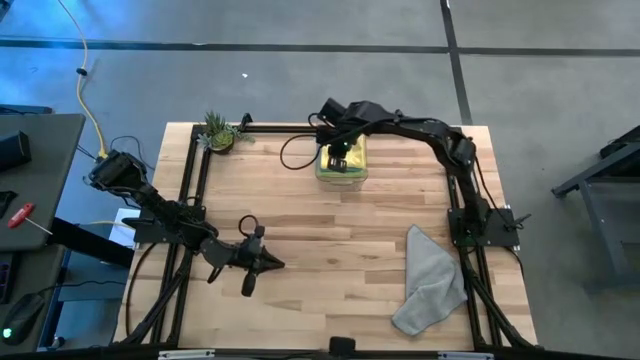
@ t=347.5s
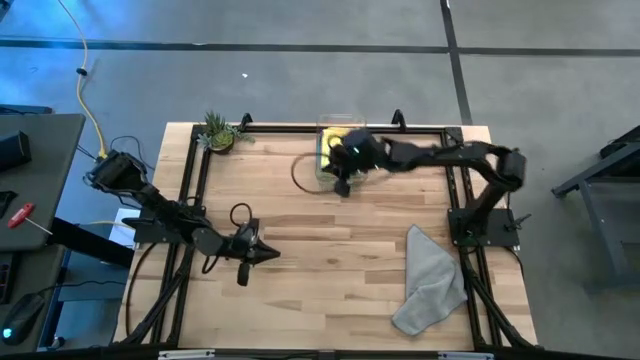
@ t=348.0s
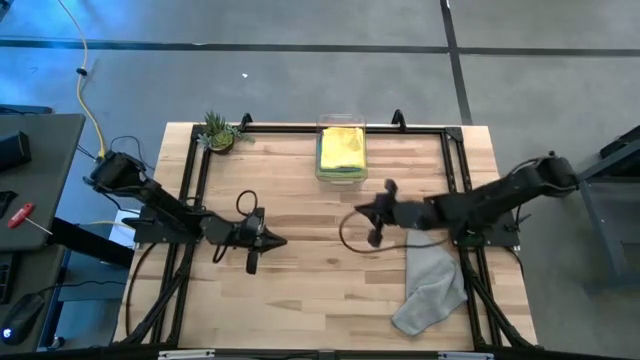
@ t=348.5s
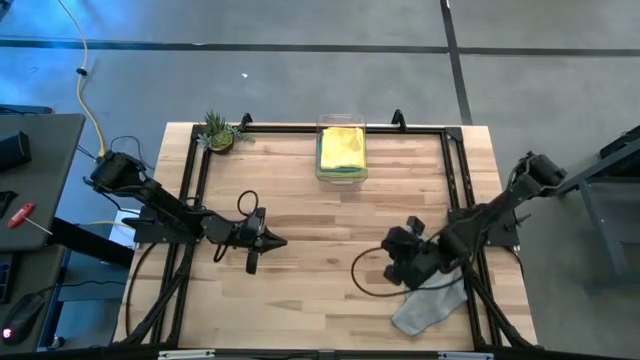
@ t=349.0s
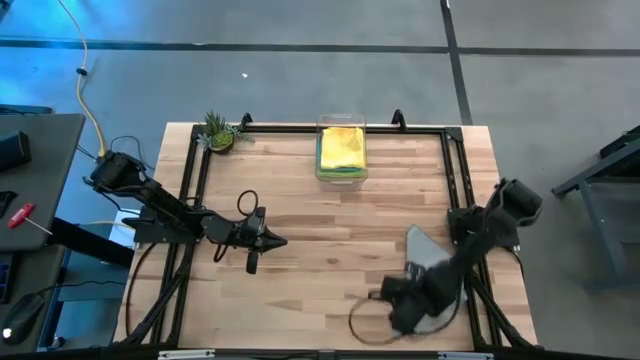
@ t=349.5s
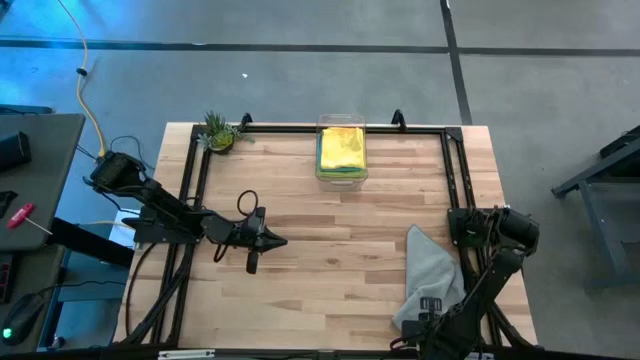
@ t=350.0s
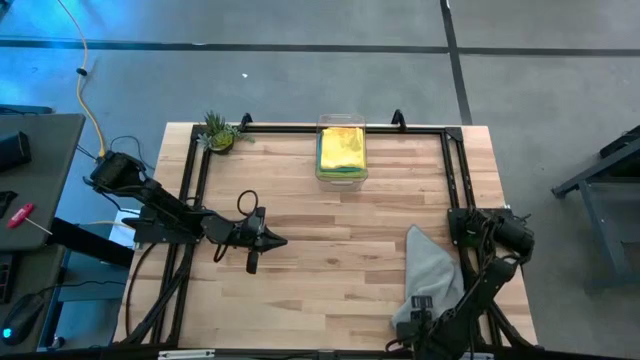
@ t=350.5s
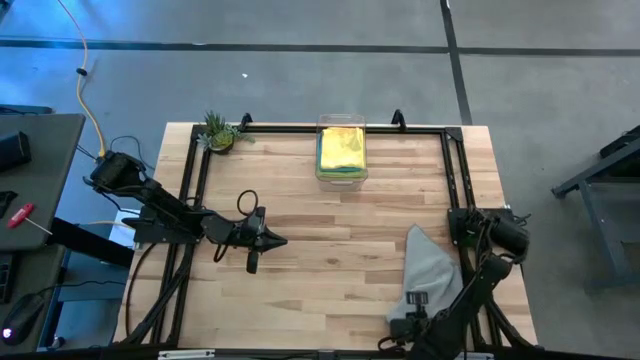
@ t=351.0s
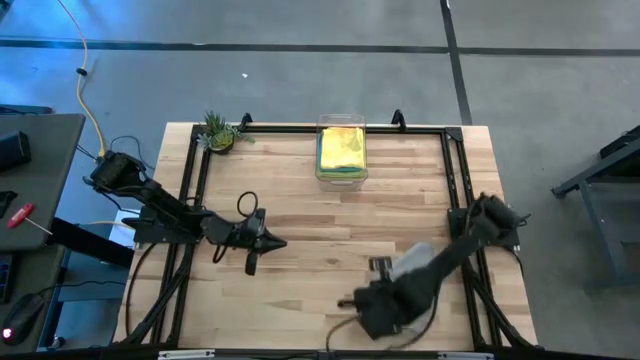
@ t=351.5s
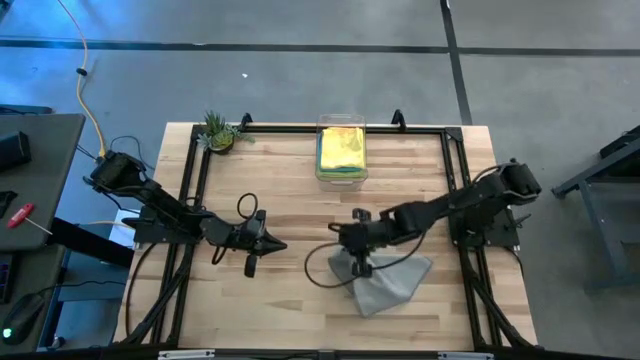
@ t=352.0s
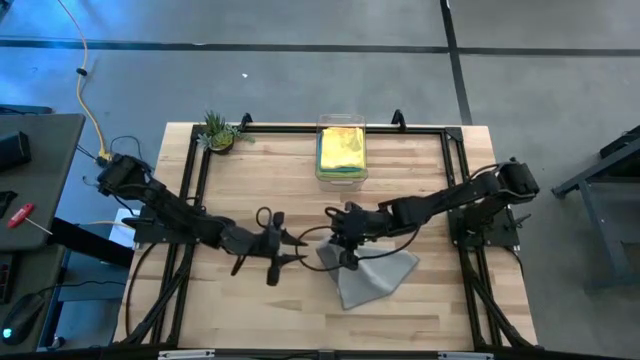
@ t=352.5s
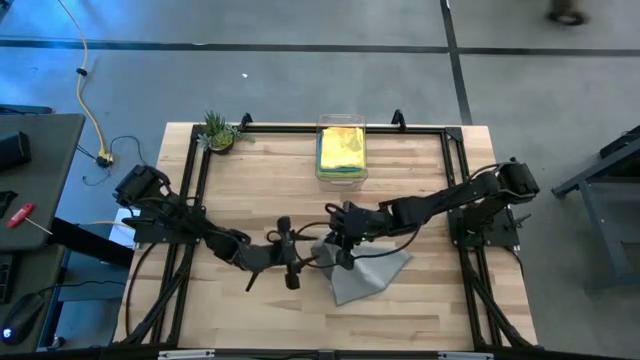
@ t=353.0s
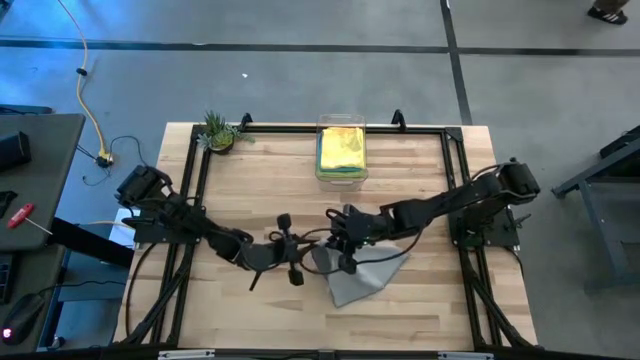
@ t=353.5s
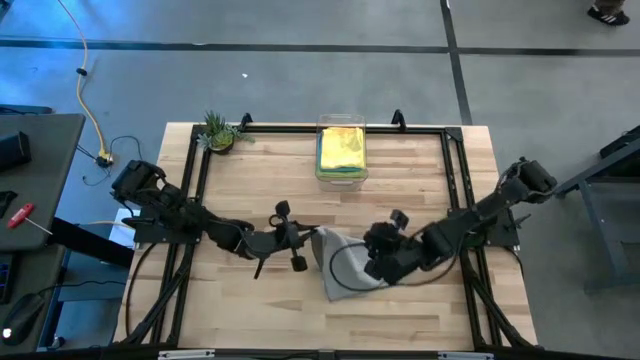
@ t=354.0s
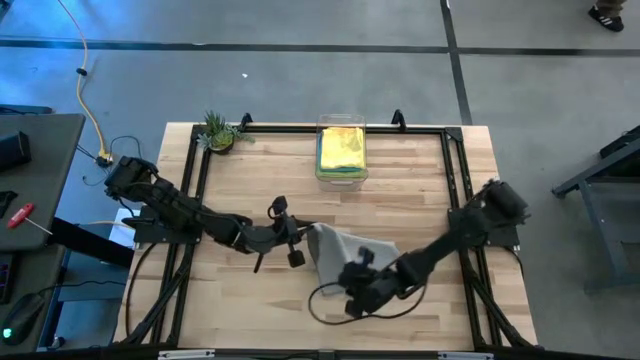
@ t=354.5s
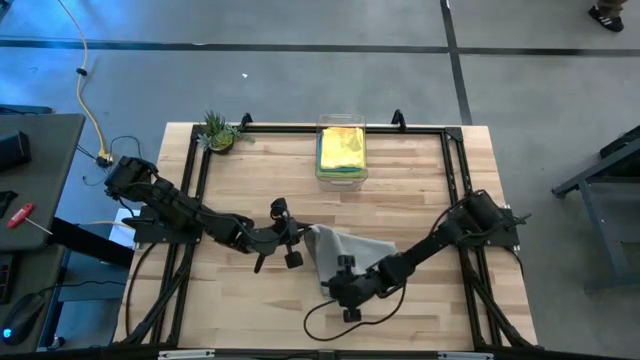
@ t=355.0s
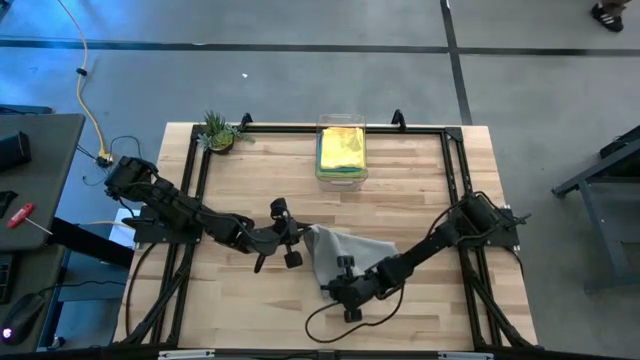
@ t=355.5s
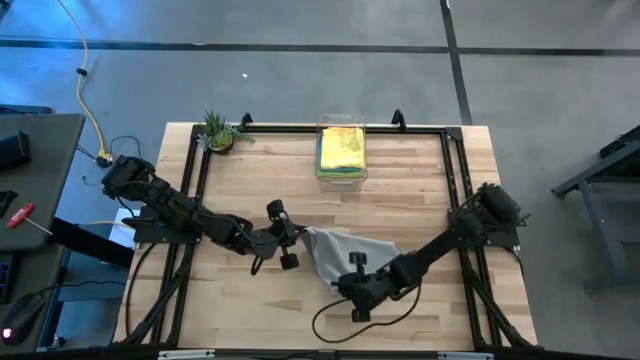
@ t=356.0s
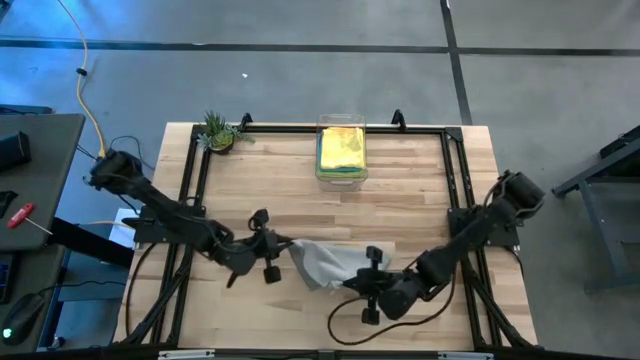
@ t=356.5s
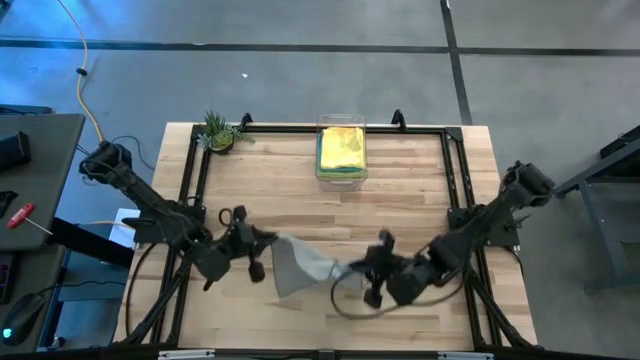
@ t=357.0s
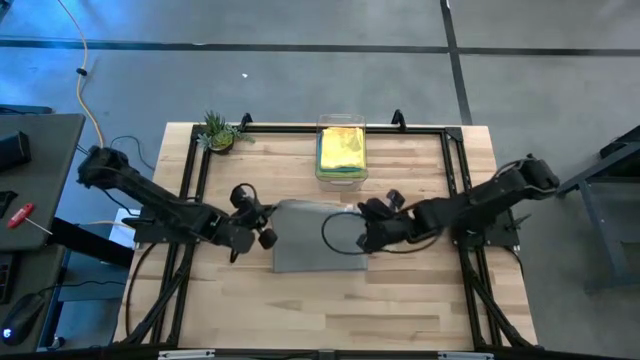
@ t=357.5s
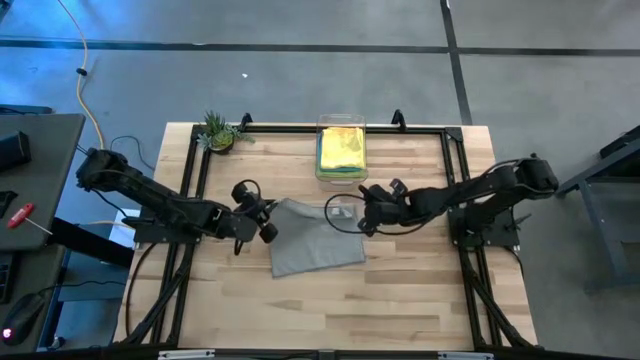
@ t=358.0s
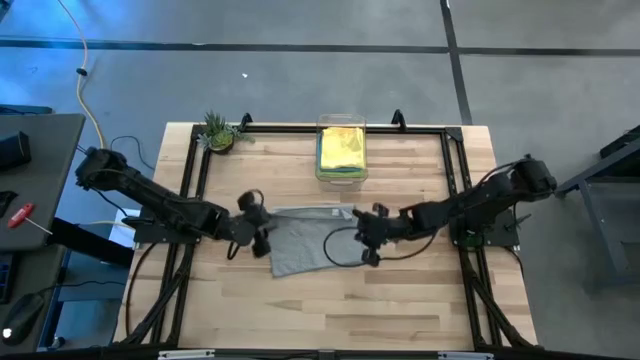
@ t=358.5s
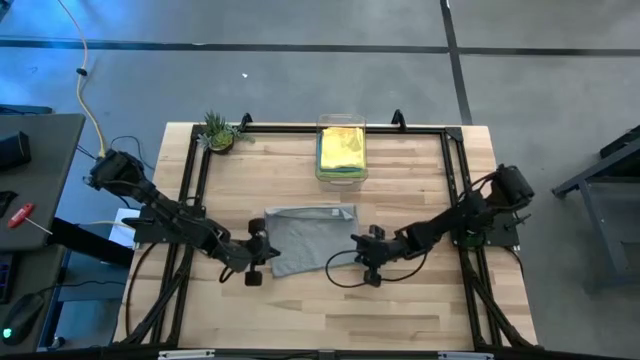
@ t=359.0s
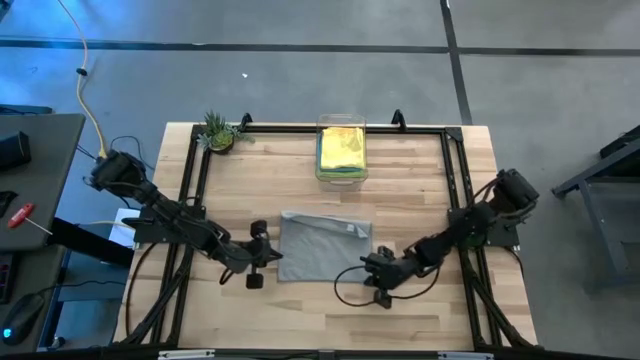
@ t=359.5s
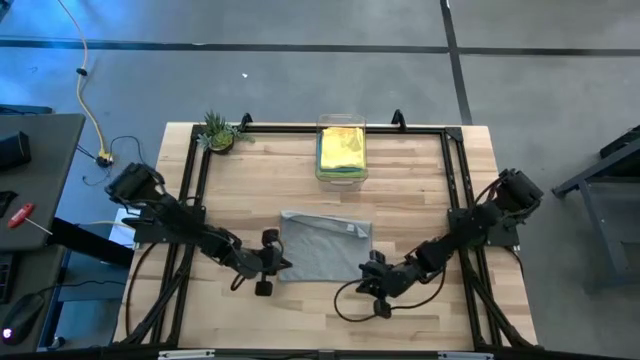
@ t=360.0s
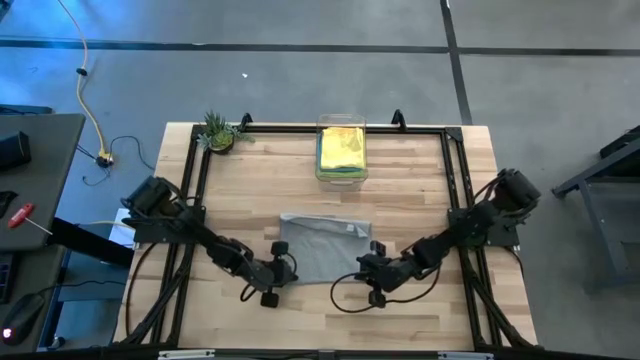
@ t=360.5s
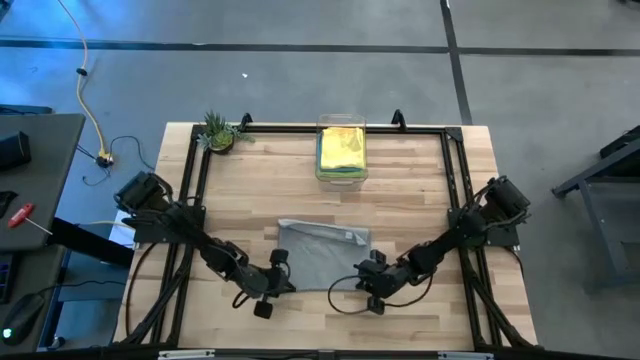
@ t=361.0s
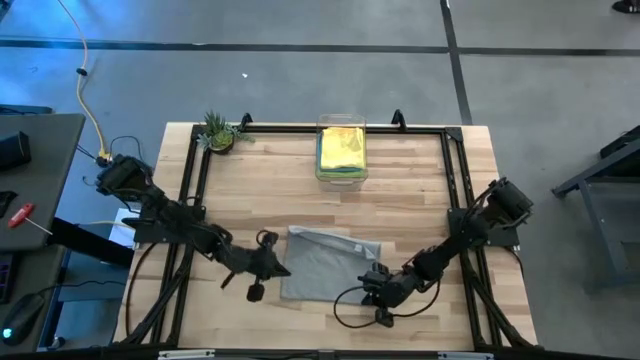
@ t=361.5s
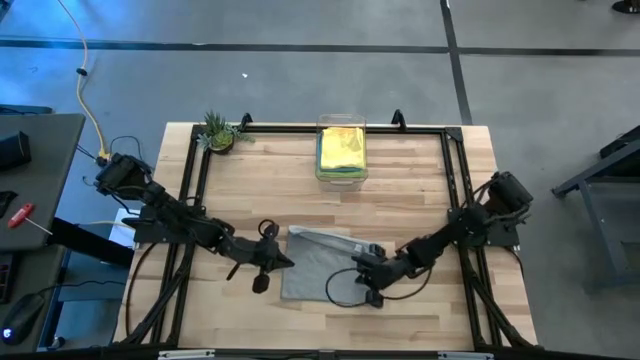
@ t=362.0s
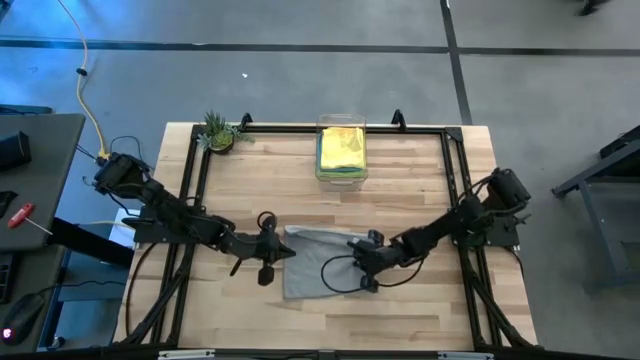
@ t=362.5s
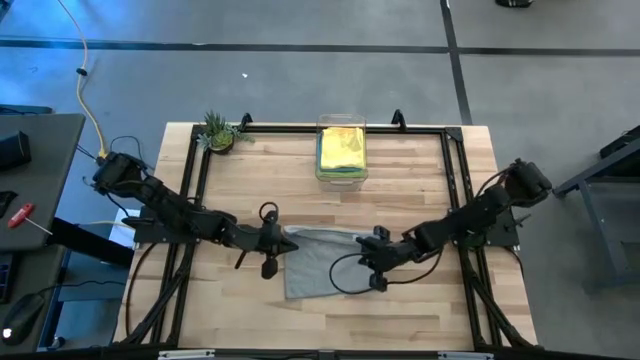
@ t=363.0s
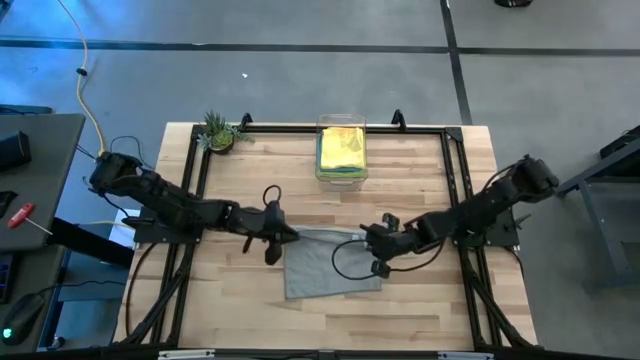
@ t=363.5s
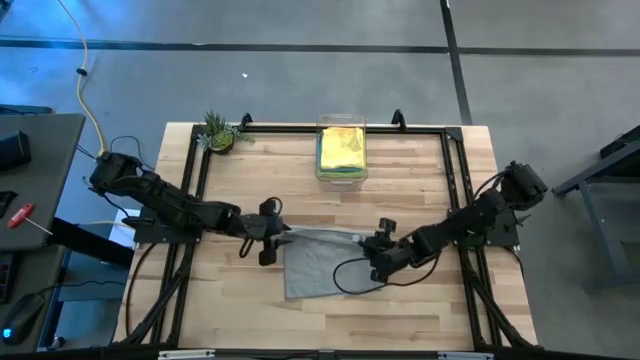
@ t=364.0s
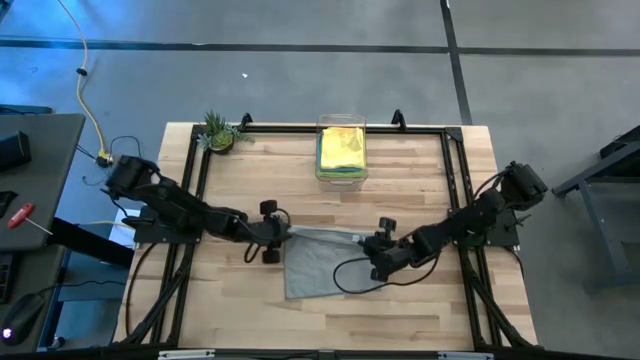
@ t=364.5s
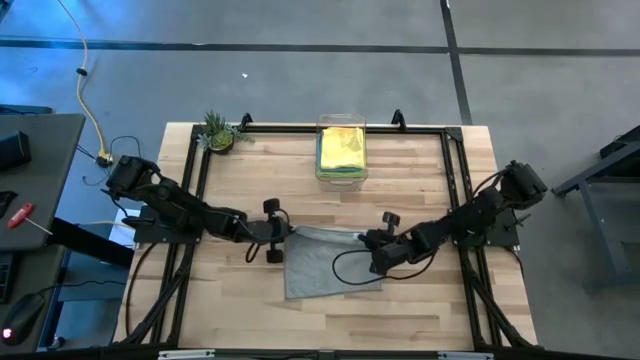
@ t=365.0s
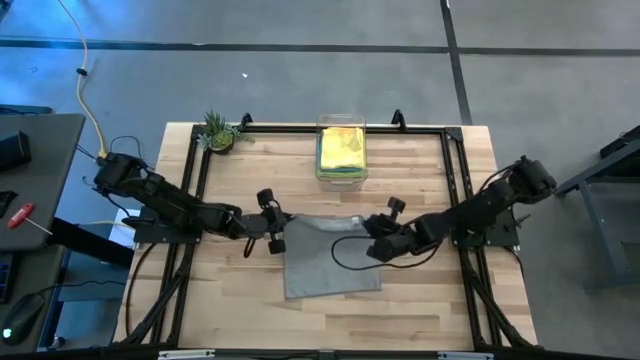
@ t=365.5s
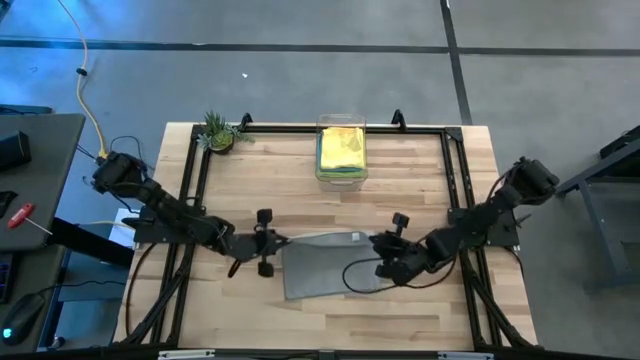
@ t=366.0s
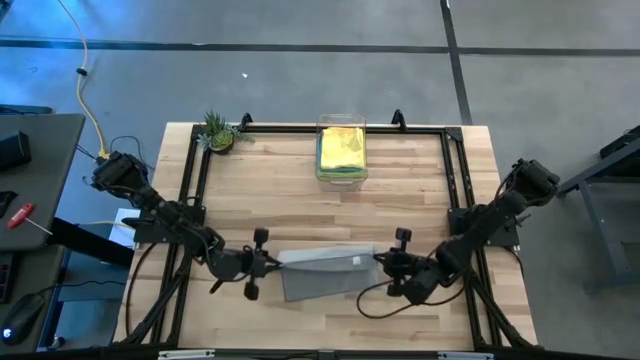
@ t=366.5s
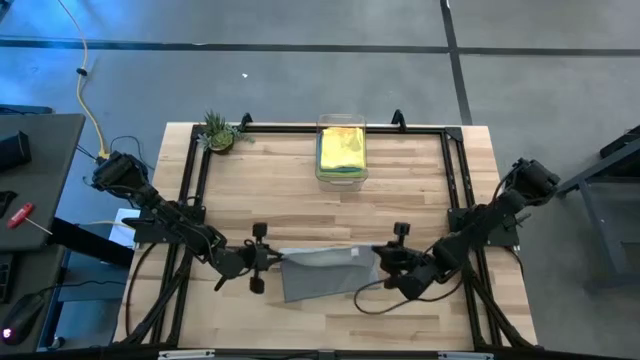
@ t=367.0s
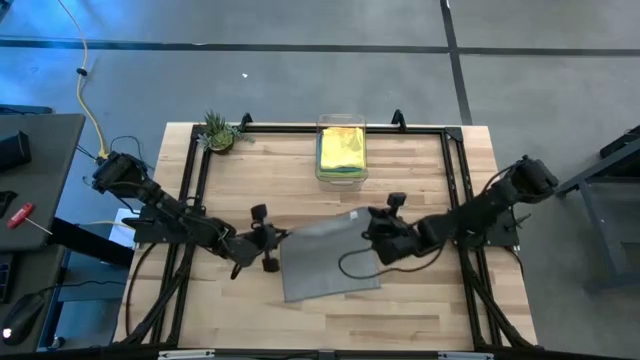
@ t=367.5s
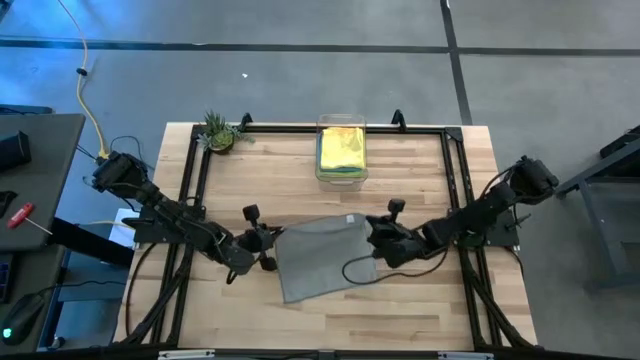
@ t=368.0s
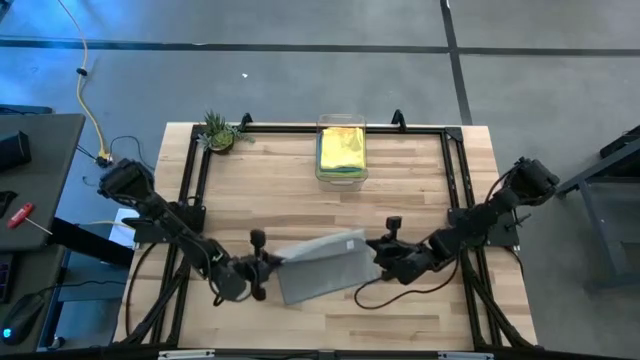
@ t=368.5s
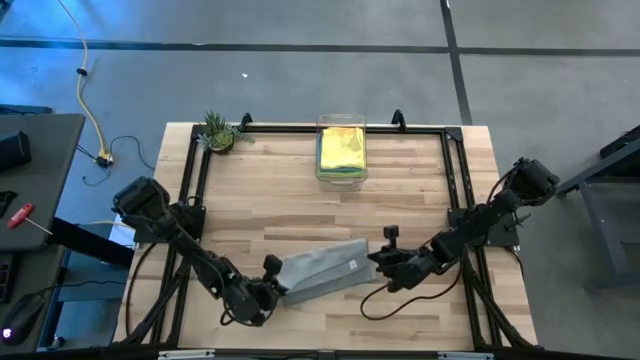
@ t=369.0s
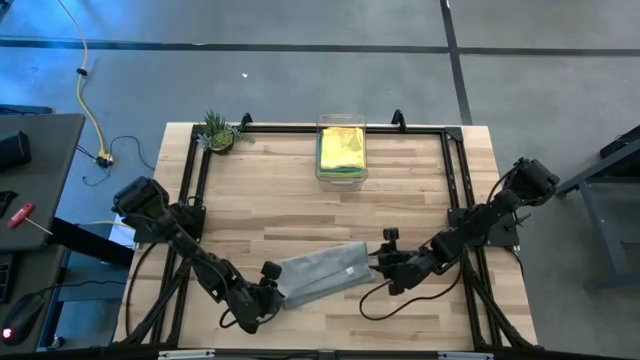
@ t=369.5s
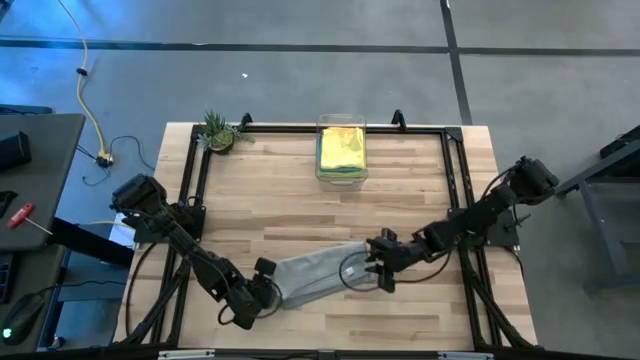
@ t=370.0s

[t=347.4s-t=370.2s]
Task: Fold microfiber towels
Fold the gray microfiber cloth
